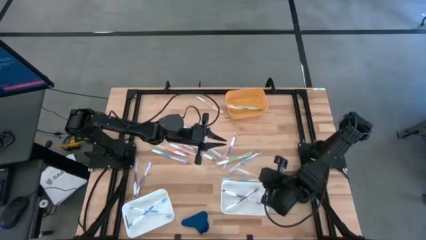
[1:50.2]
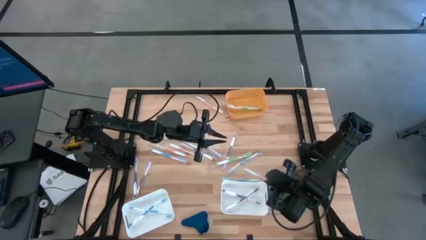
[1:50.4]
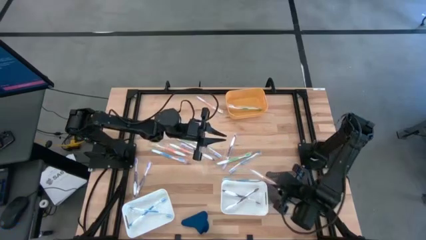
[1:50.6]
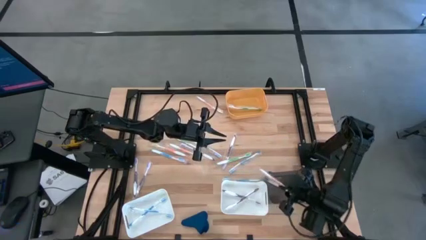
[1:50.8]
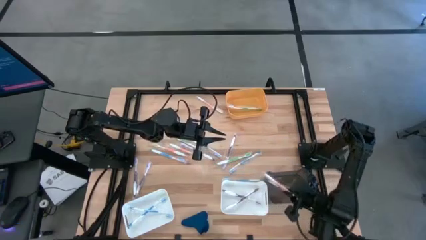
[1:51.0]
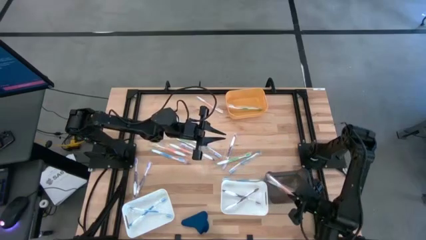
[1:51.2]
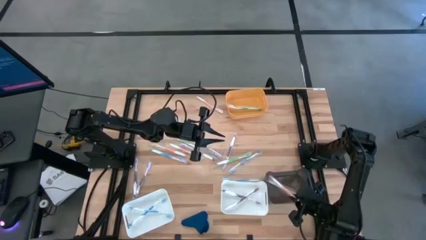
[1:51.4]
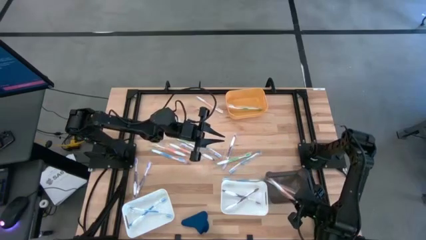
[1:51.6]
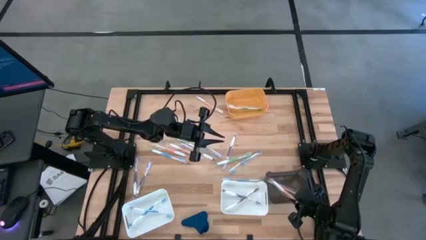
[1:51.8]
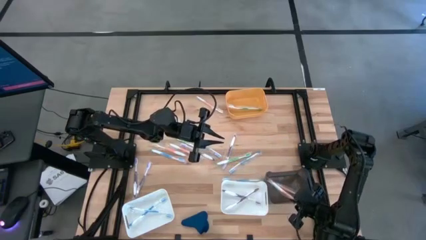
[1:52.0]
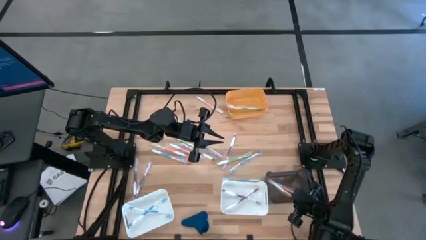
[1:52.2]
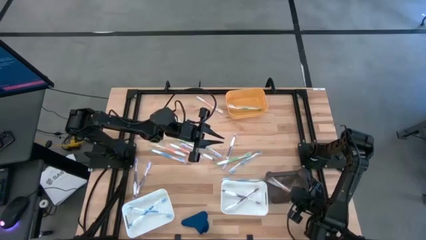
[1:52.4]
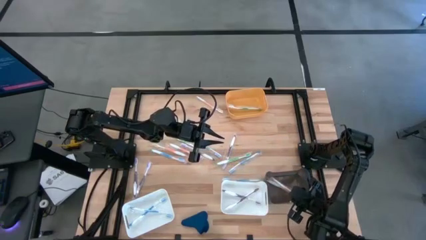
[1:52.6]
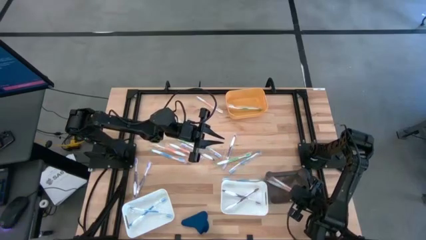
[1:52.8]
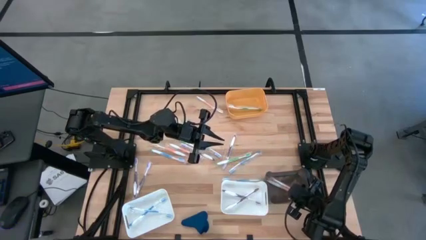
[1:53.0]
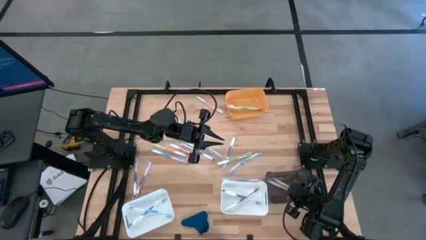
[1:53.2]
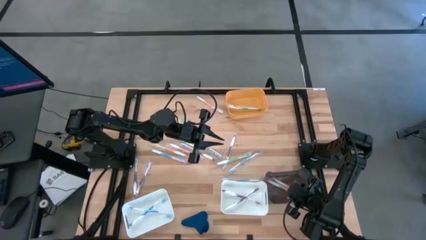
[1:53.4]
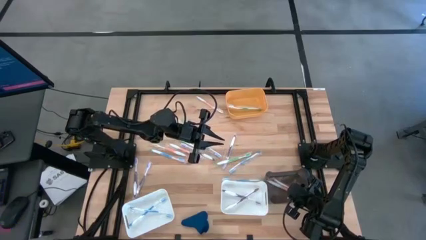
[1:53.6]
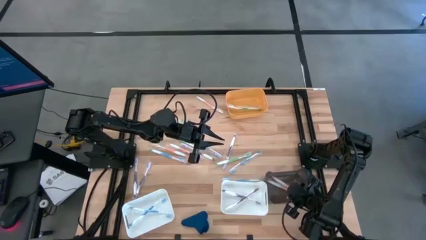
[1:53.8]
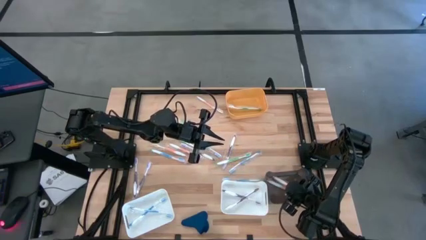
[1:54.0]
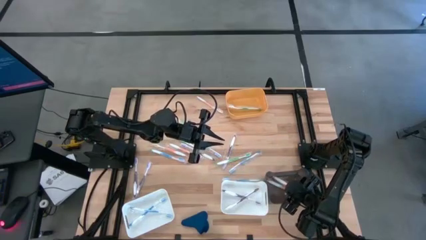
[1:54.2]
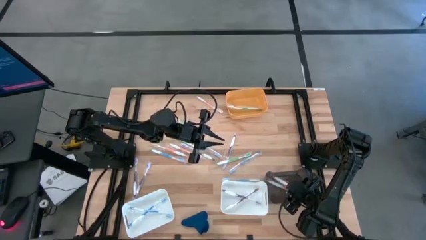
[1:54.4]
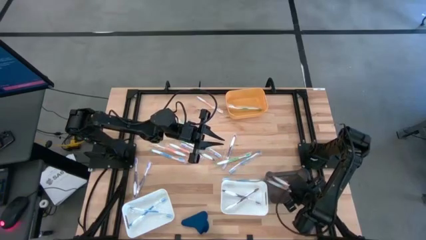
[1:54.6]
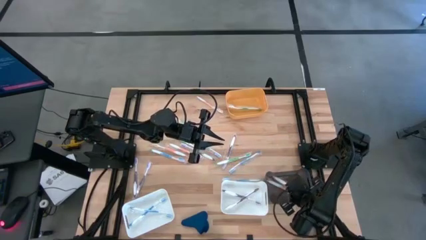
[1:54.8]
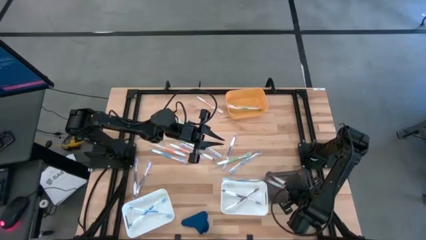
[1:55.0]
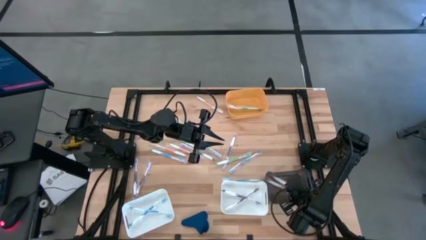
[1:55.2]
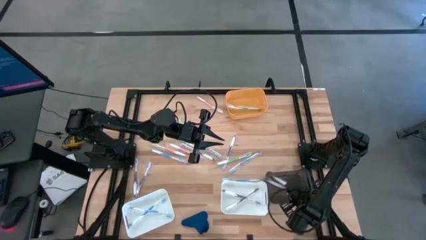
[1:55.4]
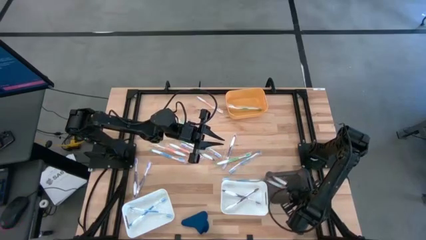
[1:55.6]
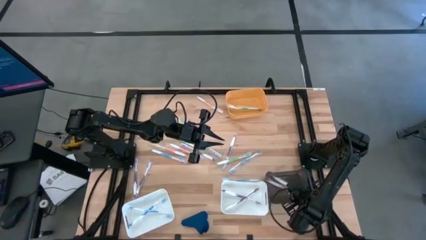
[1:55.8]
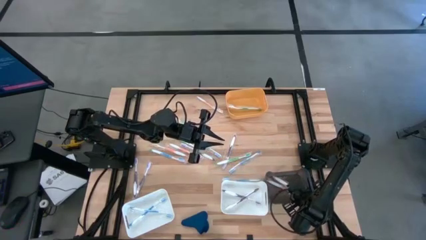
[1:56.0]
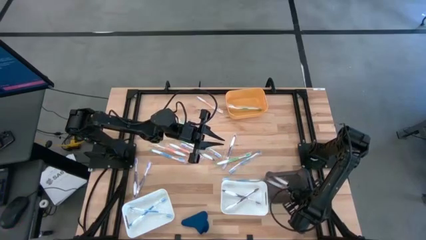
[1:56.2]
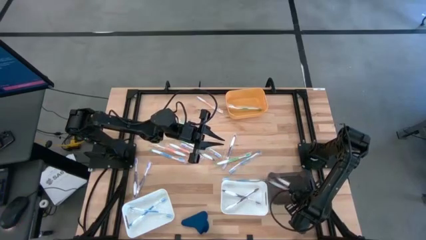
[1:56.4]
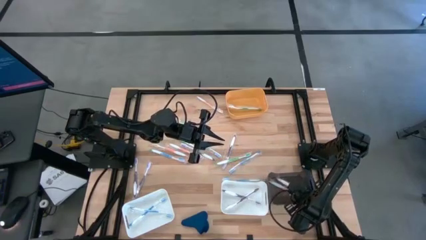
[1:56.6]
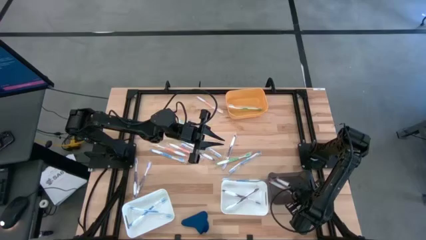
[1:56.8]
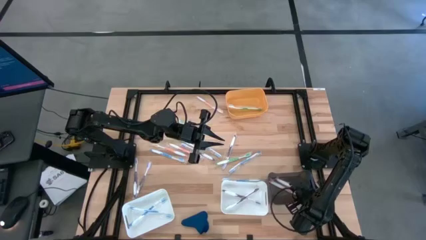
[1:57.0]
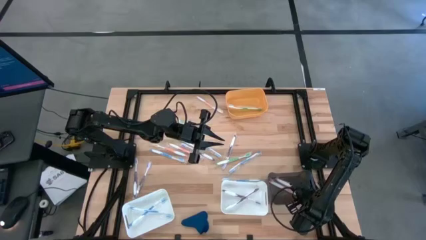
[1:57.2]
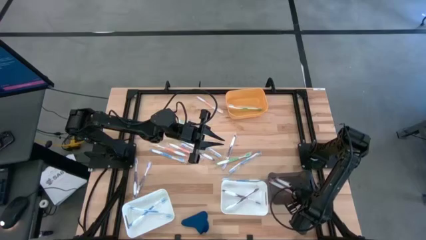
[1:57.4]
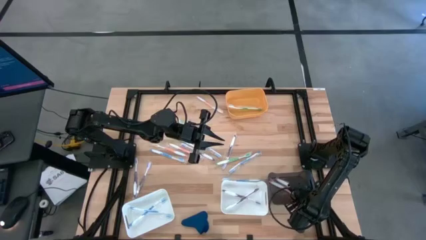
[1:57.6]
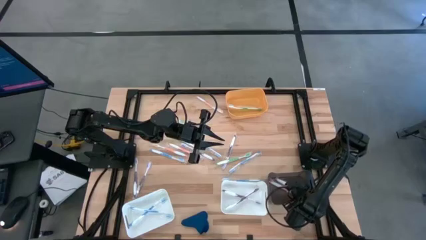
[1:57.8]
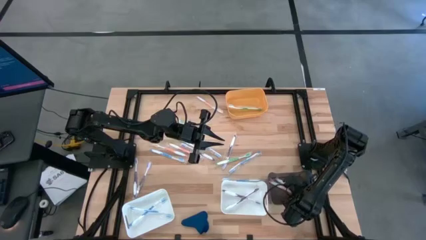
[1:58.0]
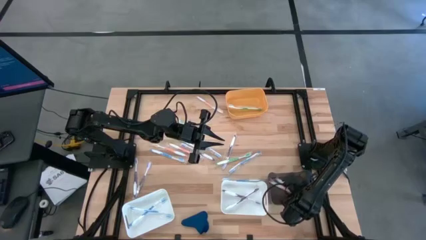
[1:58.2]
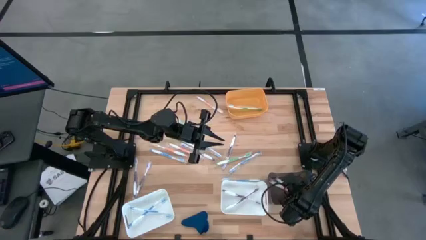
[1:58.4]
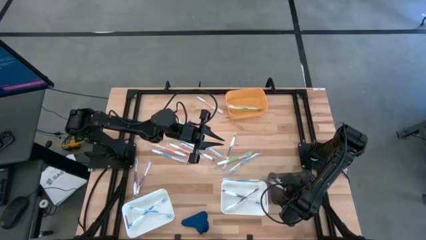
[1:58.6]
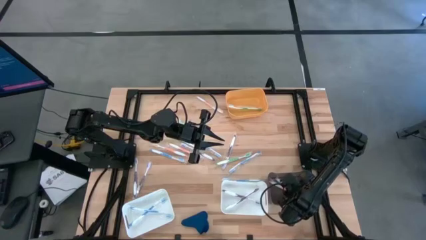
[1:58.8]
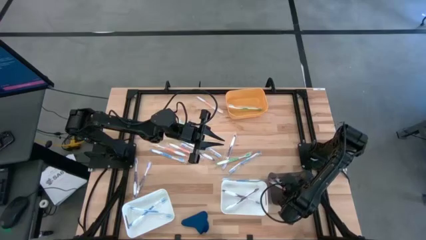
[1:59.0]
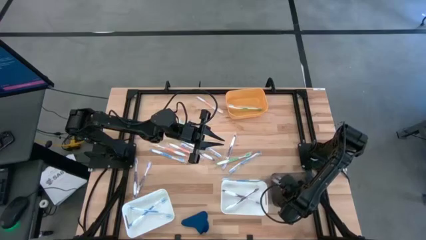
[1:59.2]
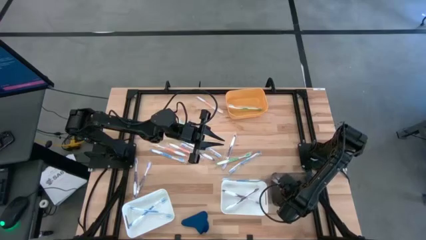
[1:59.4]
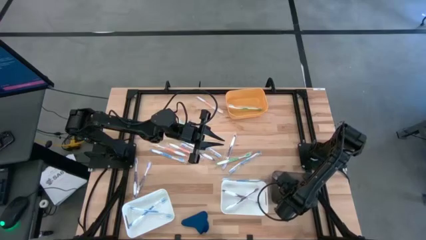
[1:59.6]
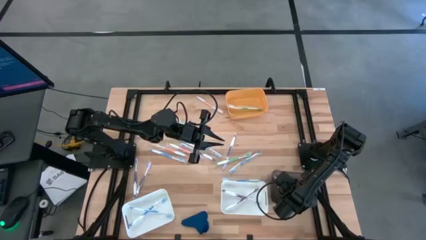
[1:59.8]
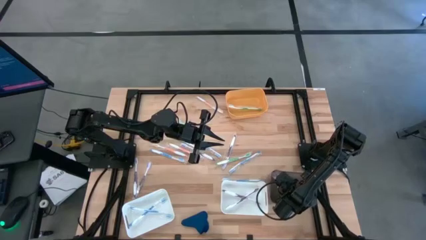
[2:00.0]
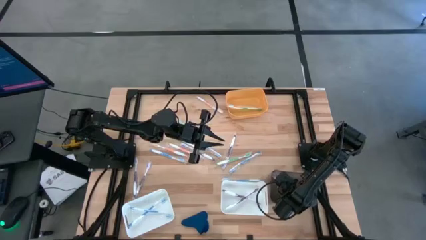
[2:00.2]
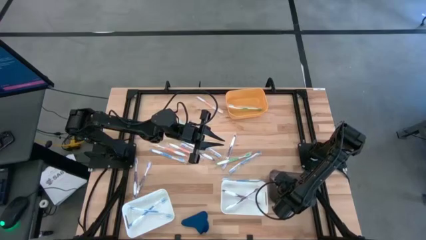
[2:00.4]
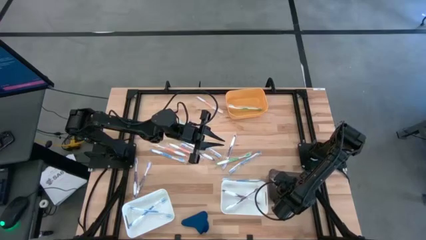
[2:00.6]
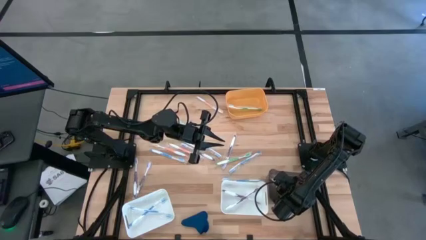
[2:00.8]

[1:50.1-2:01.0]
Task: Pick & Place Toothbrushes
Put the orange toothbrush into the black bin

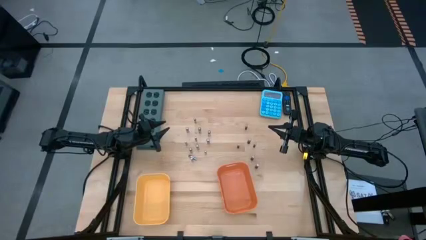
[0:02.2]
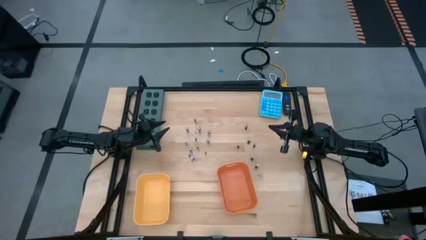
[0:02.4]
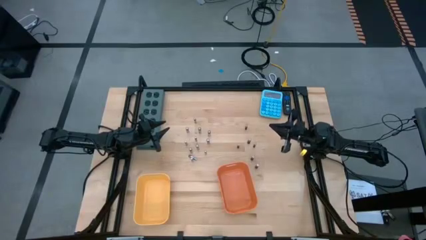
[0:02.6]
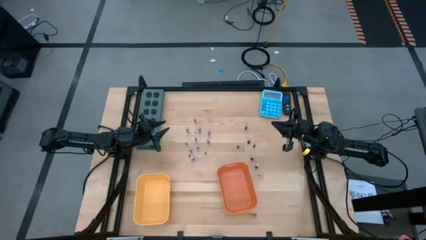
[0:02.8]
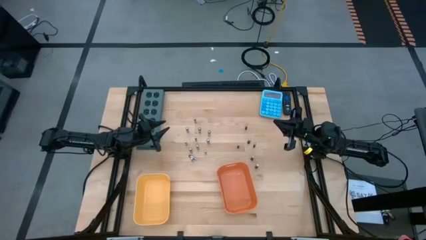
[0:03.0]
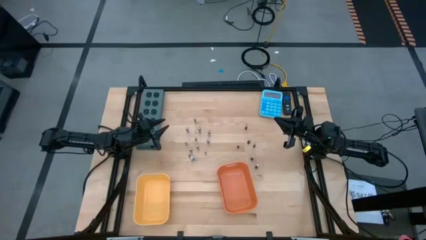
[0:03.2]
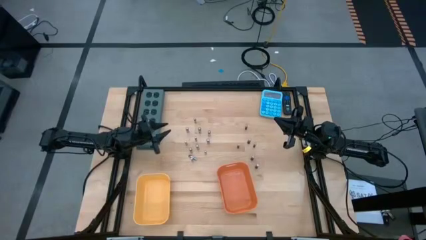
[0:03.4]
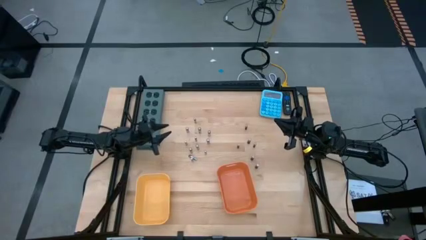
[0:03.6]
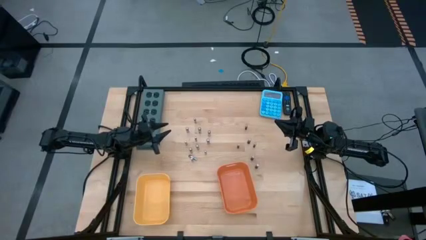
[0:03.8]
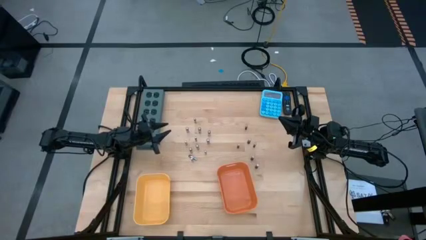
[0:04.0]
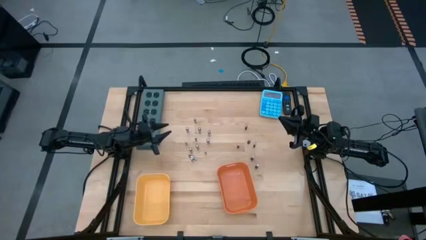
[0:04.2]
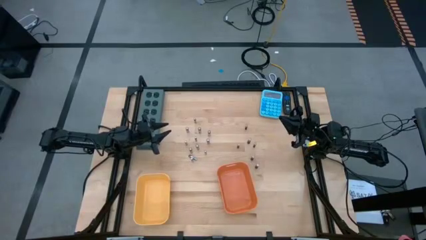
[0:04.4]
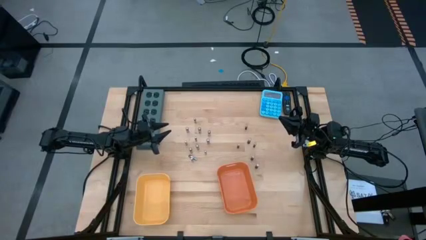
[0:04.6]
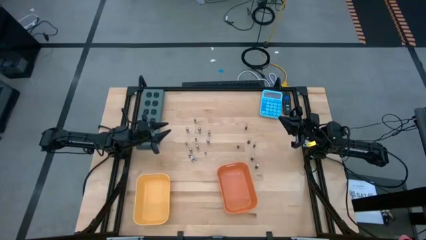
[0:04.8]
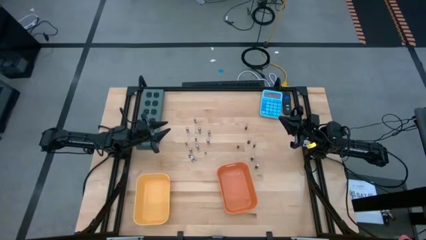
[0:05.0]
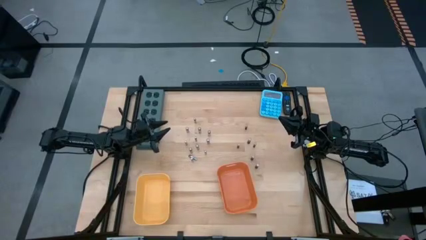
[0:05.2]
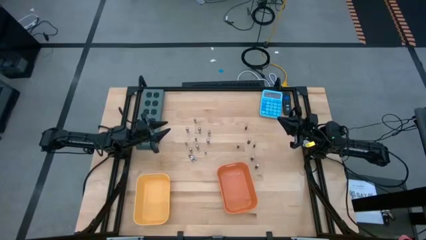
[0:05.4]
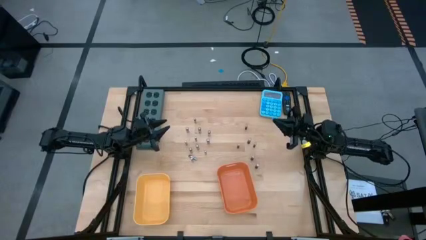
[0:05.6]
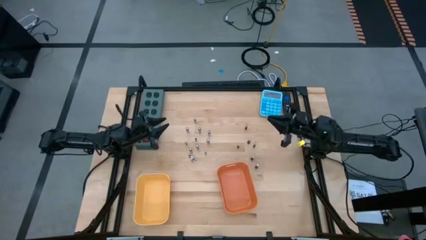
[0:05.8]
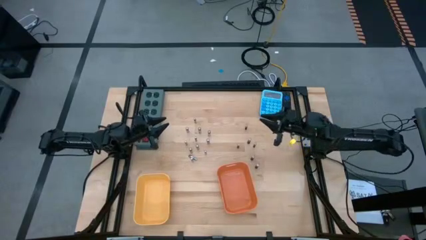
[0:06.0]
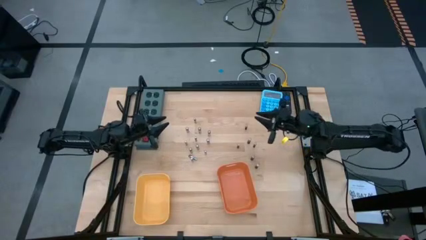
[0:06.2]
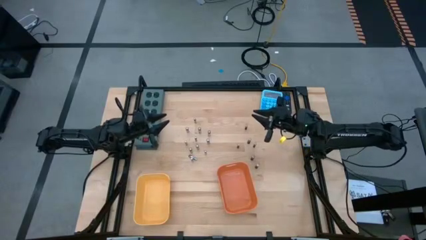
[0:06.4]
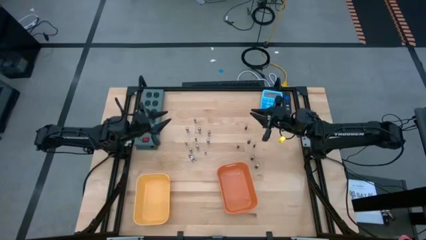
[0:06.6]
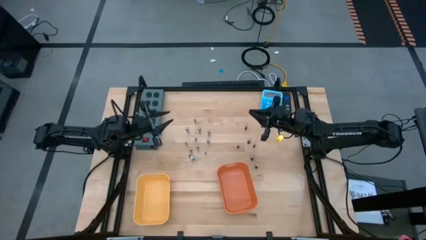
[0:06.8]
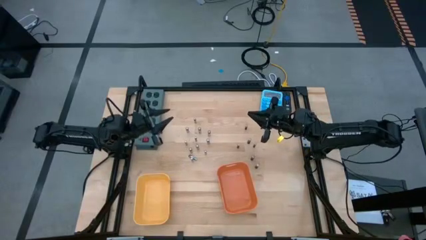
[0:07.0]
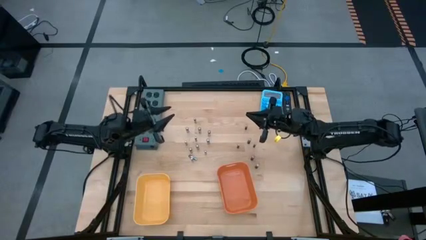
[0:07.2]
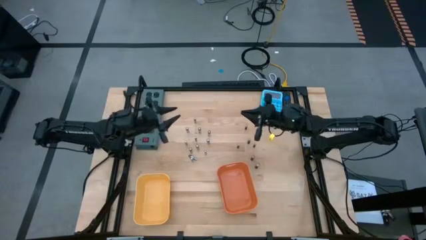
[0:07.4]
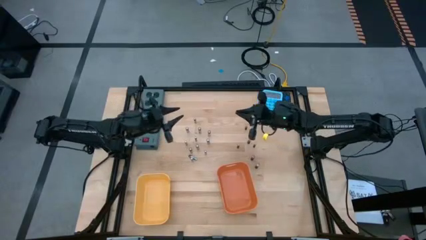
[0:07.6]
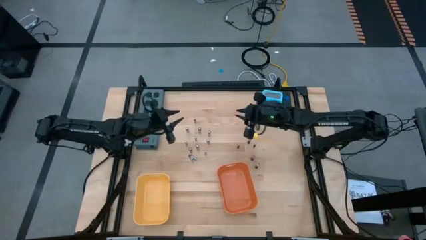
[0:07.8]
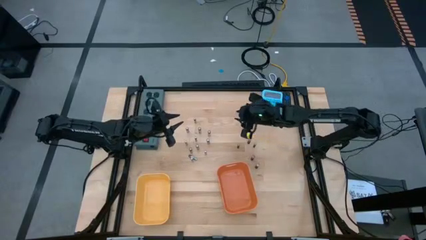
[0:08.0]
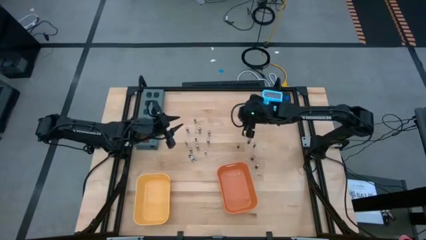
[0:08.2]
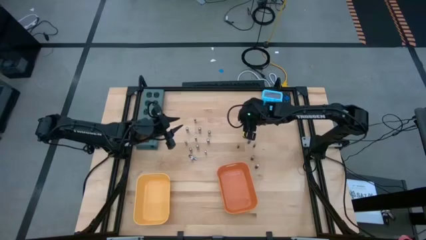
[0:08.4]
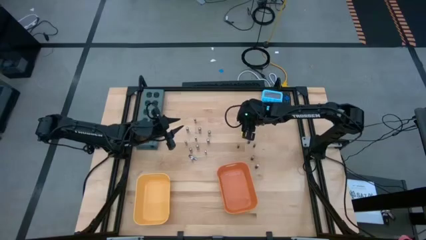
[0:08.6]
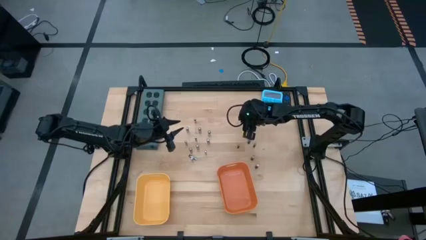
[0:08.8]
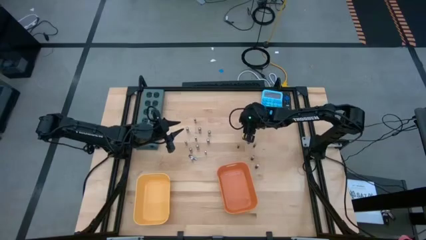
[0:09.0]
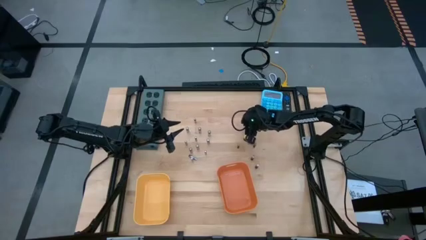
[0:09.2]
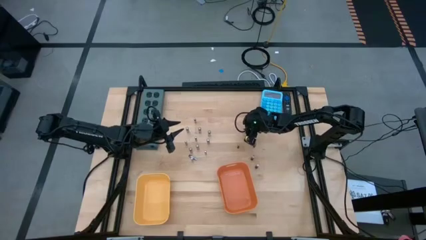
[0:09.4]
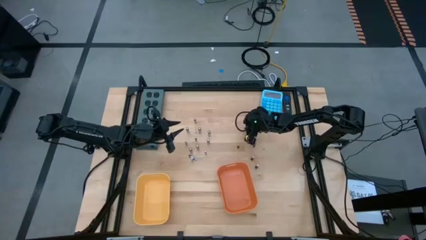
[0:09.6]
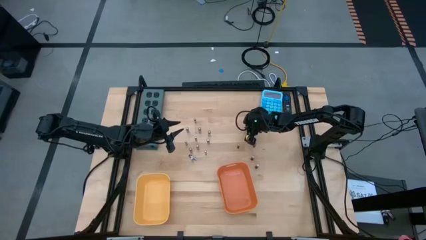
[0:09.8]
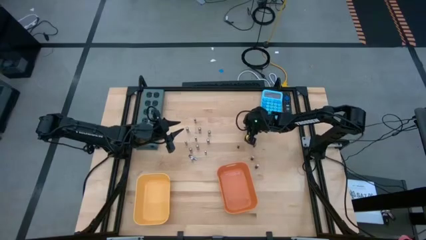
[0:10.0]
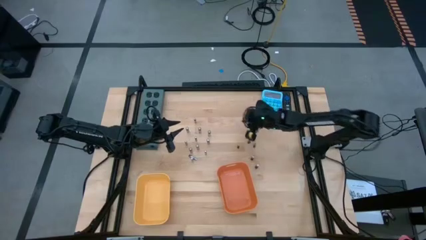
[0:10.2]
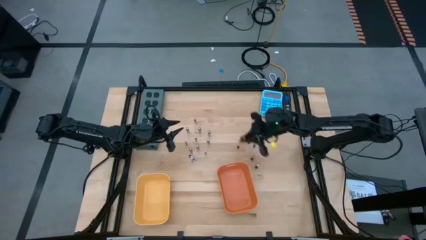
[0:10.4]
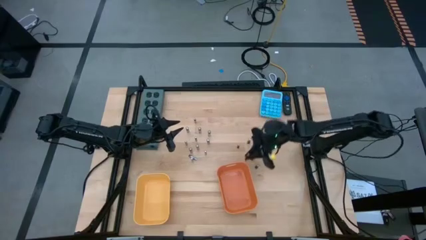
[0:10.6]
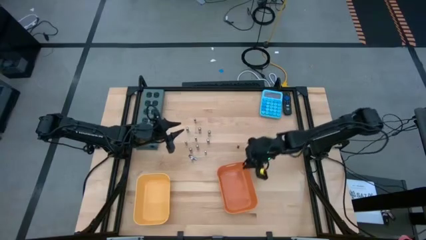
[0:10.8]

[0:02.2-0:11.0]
Task: Sort batteries
Put the brown battery into the orange bin
